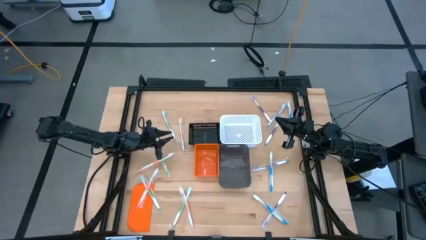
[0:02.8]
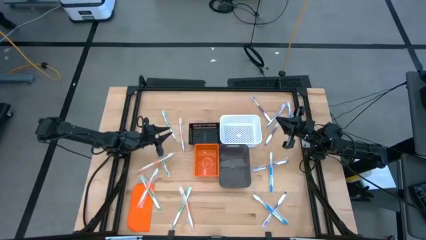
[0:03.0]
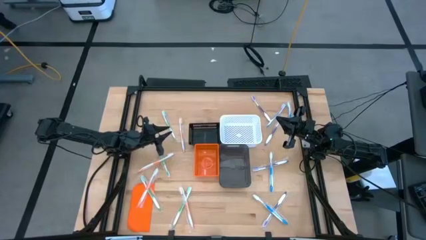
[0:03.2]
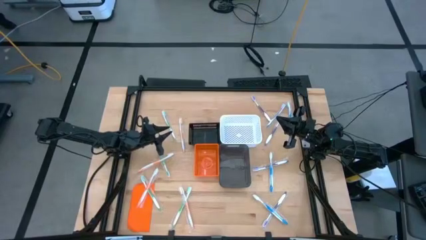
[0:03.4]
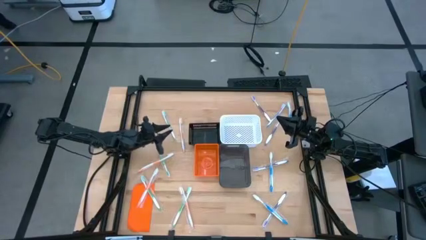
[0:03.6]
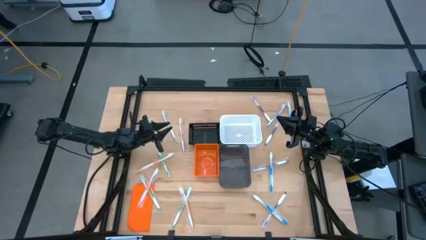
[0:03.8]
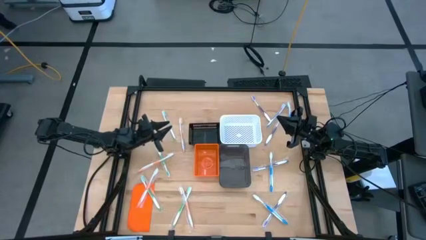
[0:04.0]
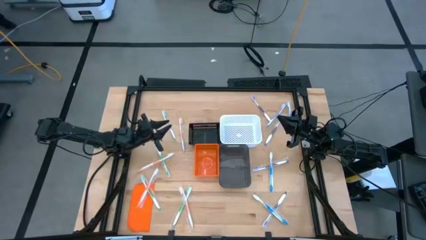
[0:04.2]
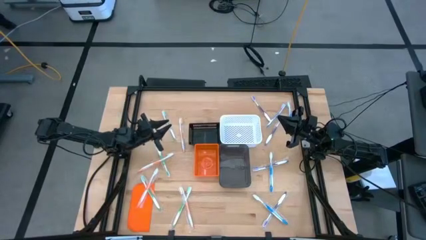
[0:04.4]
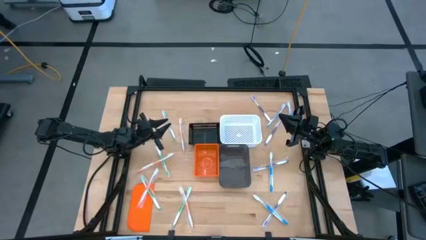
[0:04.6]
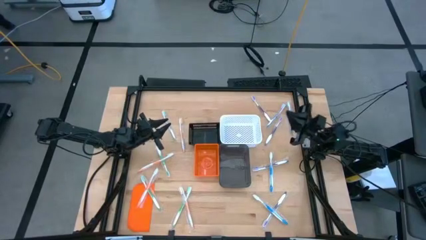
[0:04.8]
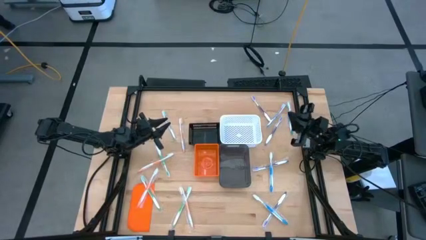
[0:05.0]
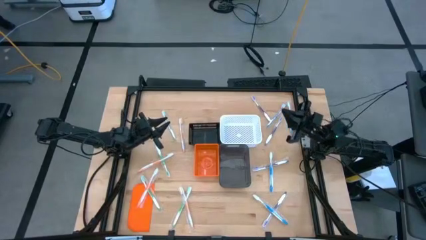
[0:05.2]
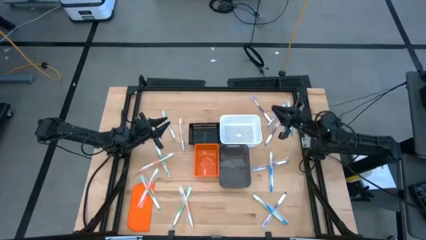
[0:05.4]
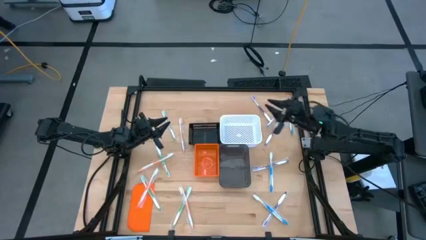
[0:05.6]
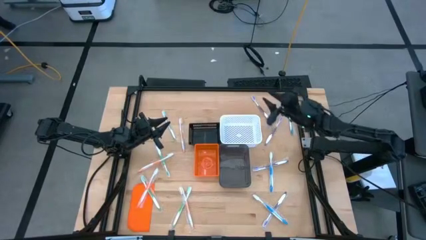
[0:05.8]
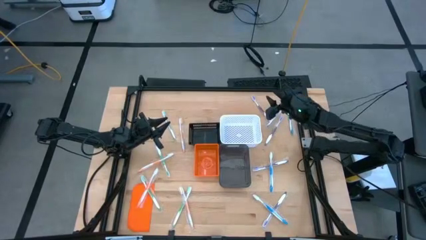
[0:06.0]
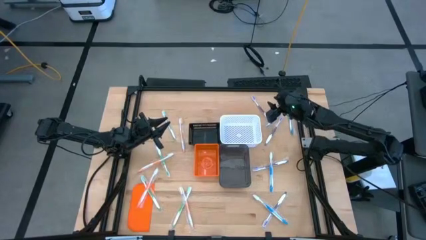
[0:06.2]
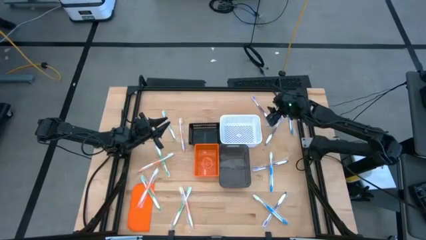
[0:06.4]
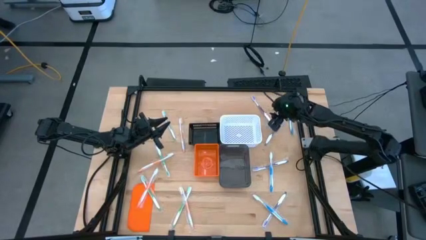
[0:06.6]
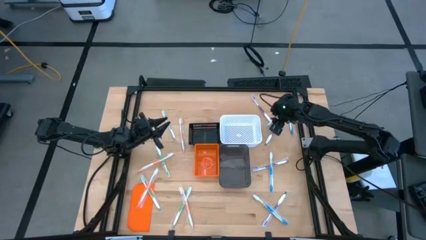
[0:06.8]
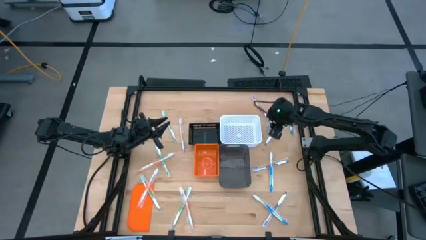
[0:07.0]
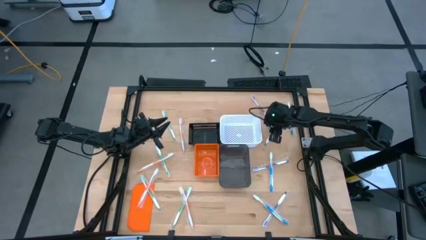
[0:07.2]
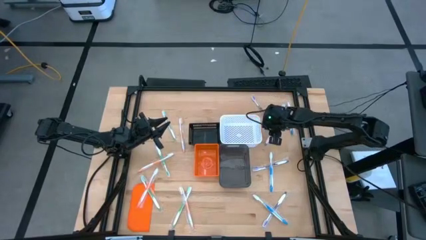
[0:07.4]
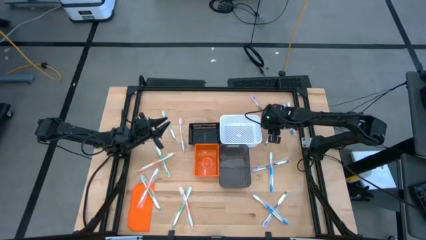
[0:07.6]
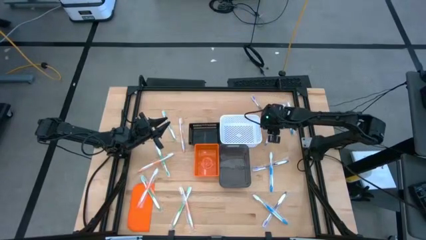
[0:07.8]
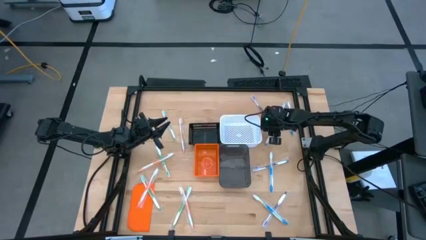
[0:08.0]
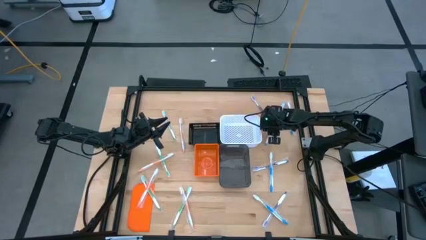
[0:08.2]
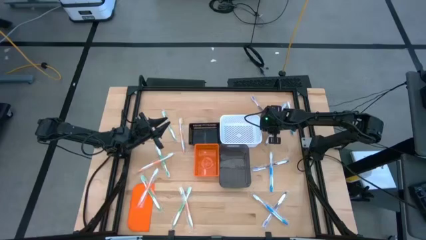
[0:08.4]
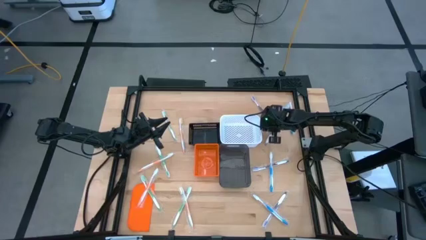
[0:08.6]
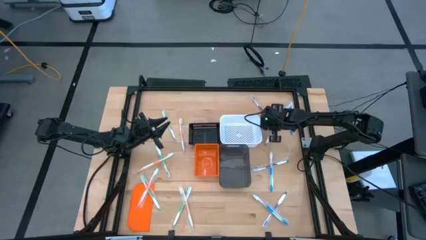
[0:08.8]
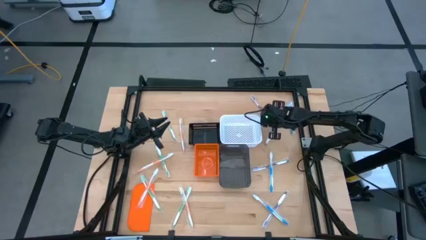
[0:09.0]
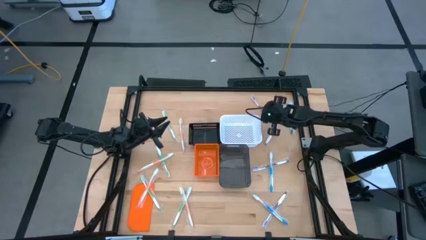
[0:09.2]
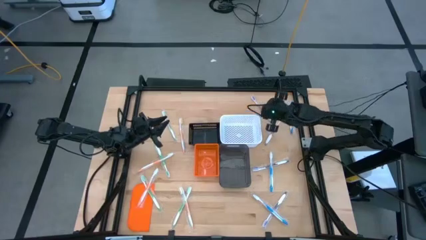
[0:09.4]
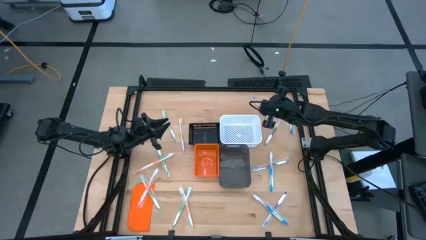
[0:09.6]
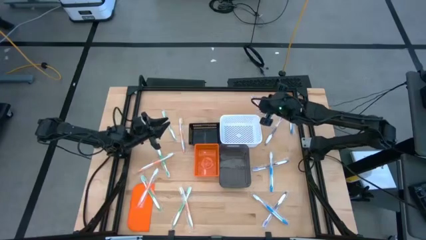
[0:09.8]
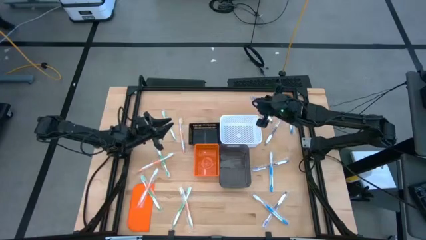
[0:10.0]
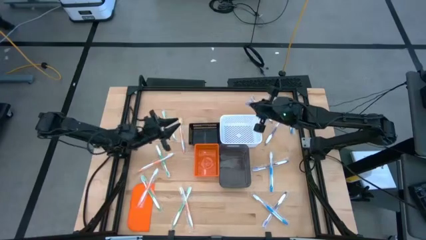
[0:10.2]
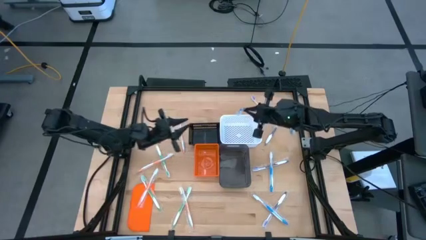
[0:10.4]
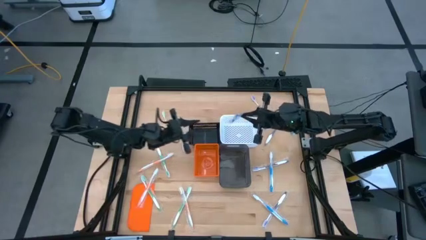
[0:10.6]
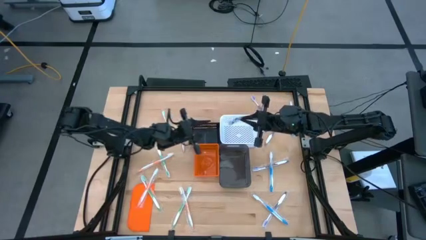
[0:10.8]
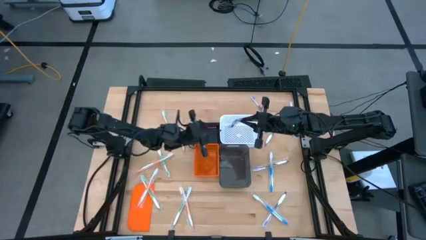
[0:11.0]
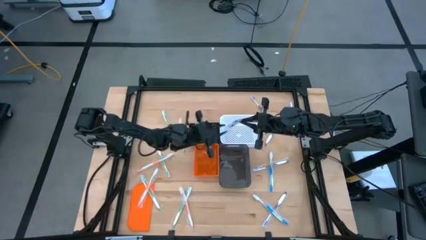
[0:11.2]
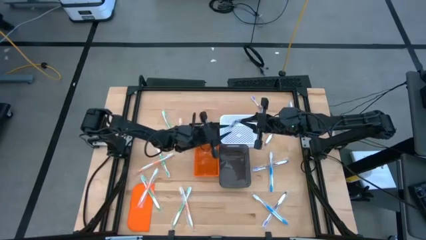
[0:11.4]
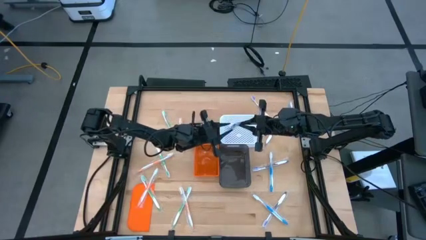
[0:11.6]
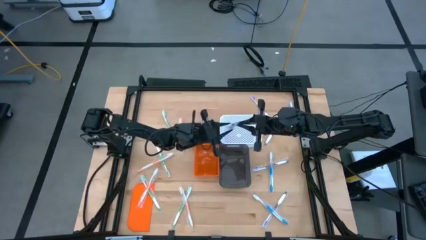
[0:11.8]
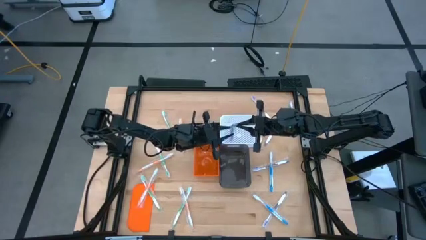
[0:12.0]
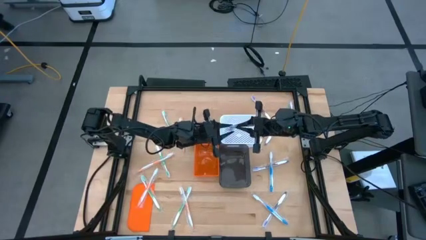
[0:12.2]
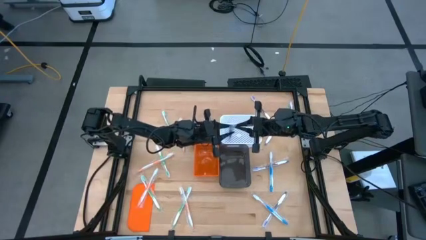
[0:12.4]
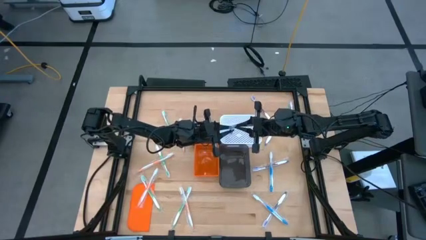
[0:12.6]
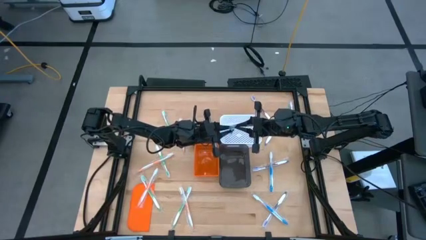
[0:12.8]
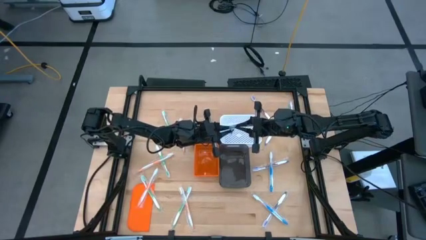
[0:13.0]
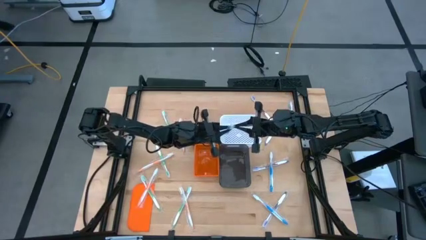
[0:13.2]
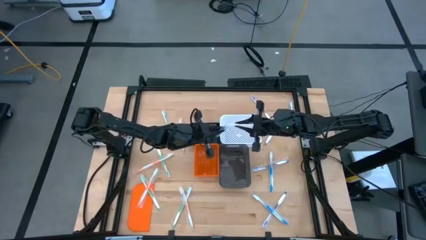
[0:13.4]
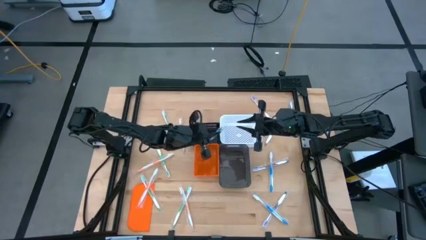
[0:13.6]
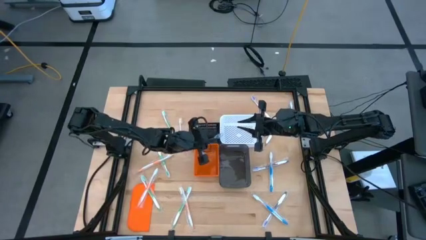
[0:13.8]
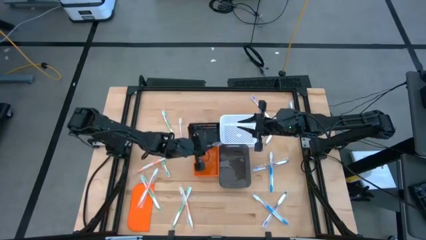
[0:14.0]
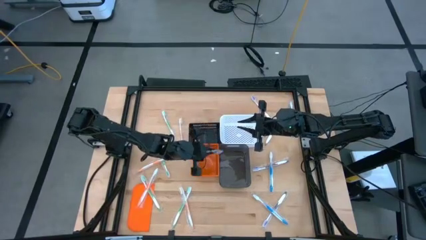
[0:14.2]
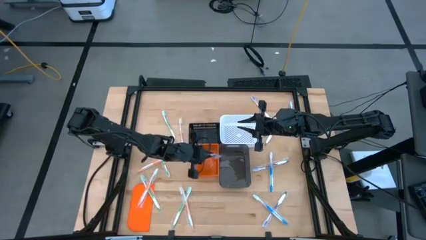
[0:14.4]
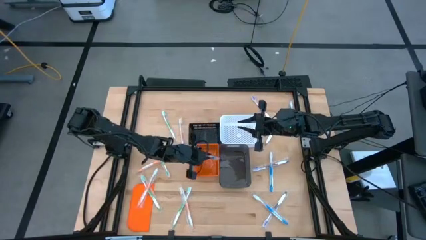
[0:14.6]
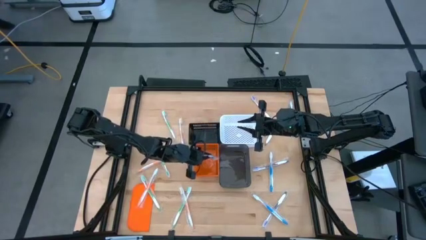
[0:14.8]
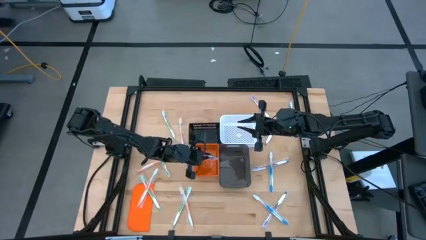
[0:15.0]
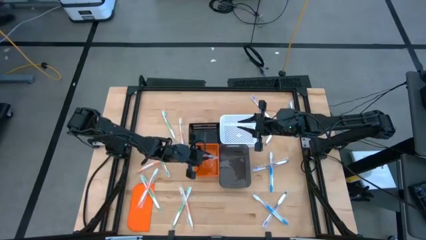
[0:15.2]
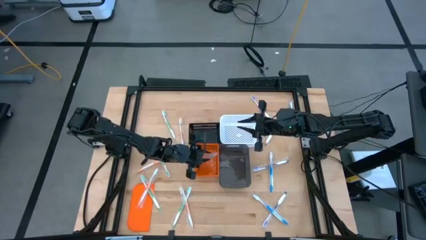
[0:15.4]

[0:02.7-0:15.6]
Task: Pick & Place Toothbrushes
Put the blue toothbrush into the orange bin
